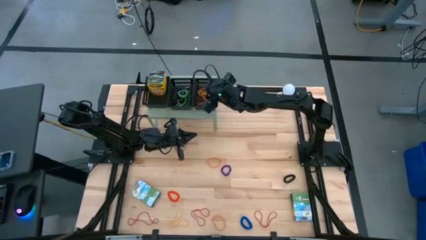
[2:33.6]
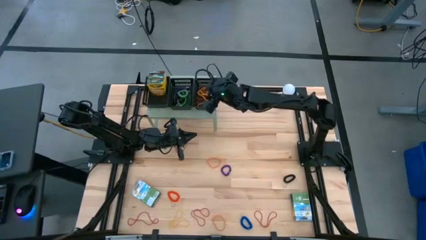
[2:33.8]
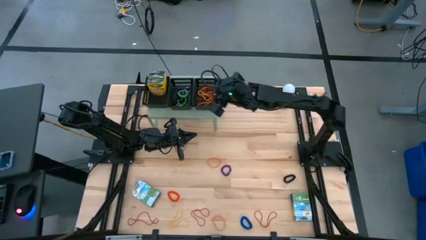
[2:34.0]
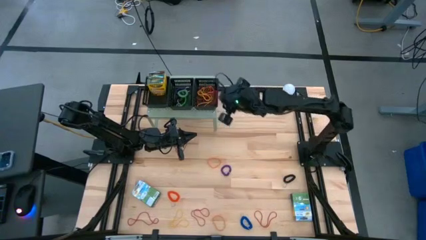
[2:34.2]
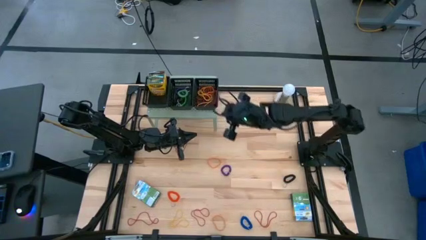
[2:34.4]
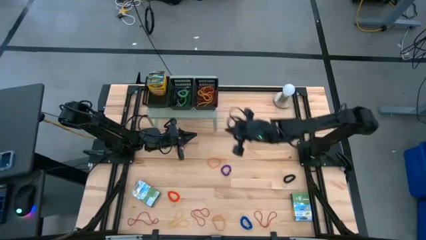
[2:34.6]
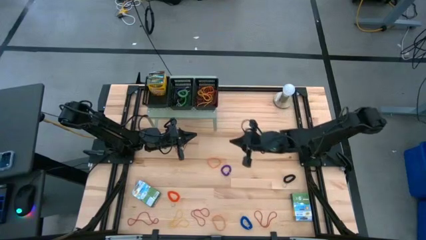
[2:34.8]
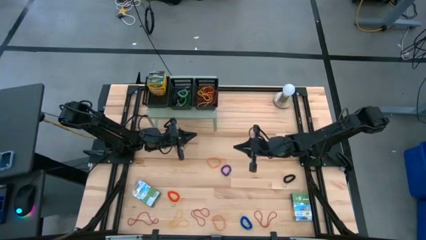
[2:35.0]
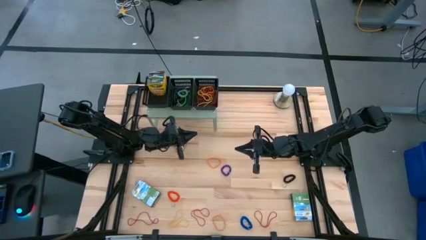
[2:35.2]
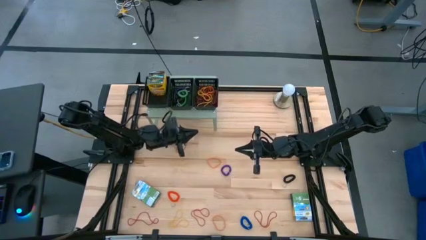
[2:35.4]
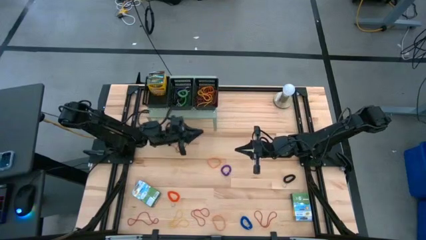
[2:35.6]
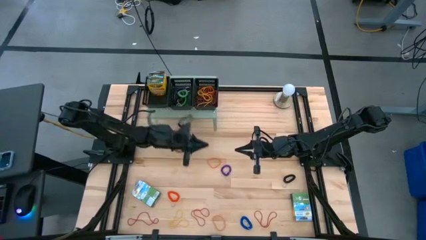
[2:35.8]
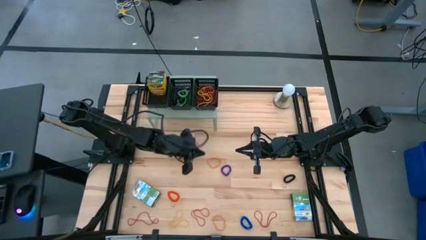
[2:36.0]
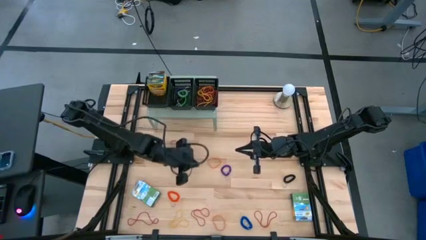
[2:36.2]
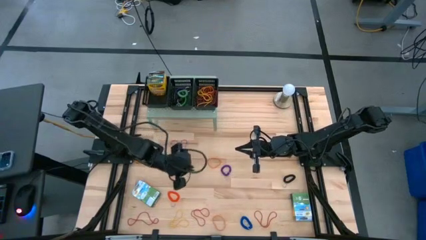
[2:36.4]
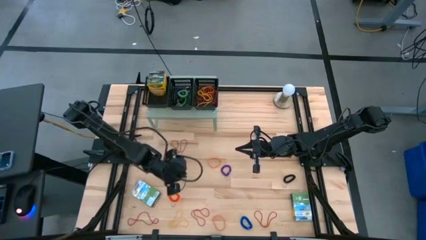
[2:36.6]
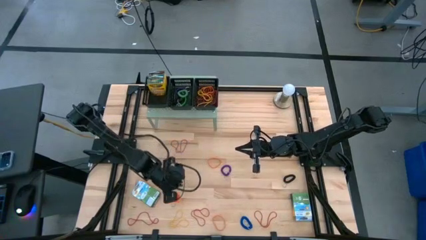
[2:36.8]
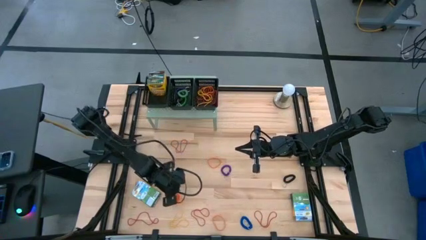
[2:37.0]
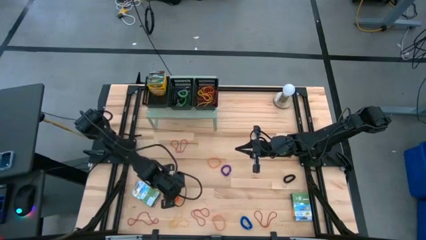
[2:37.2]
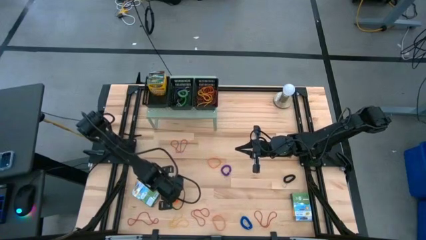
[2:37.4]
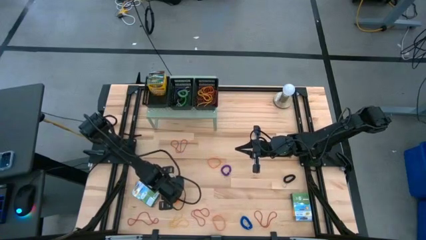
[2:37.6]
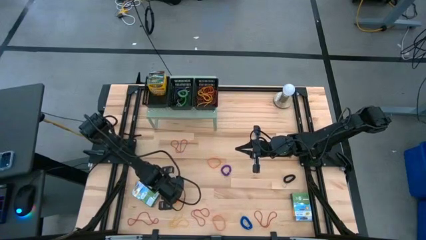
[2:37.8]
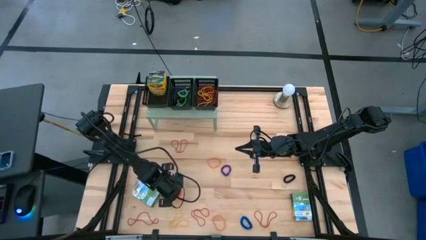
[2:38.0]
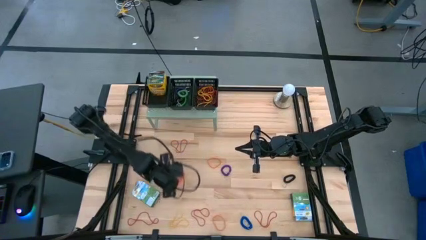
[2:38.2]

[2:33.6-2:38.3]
Task: Pick & Place Office Desk Supplies
Put the orange spring keychain into the middle black bin on the shelf

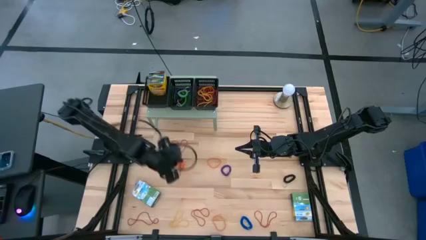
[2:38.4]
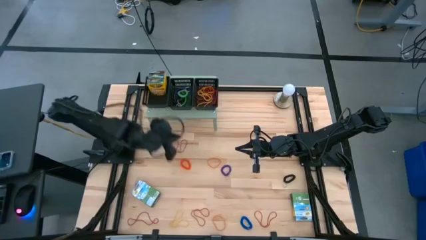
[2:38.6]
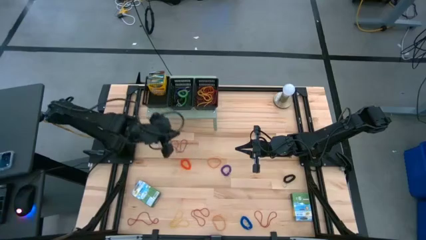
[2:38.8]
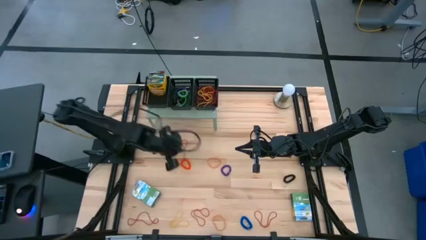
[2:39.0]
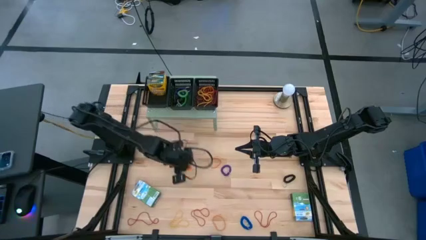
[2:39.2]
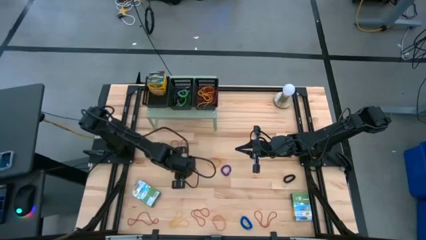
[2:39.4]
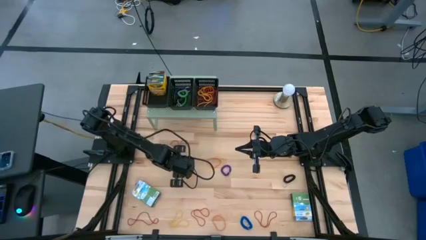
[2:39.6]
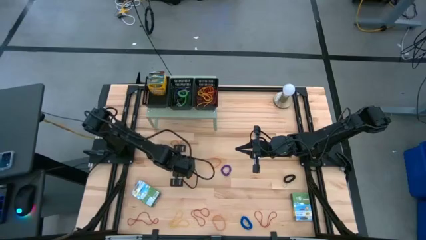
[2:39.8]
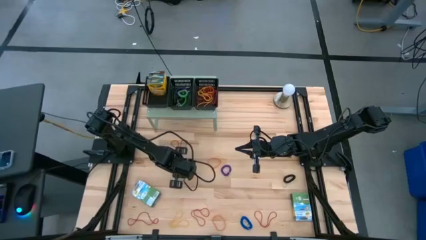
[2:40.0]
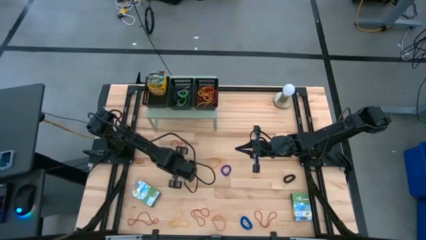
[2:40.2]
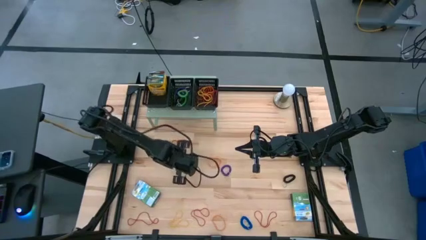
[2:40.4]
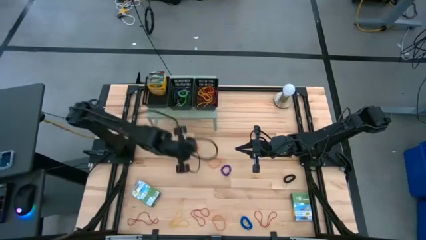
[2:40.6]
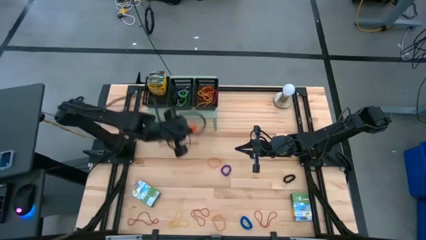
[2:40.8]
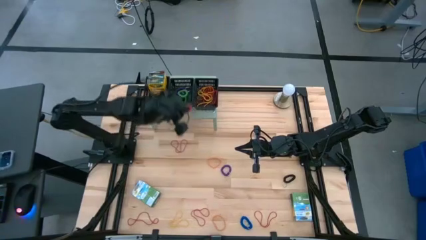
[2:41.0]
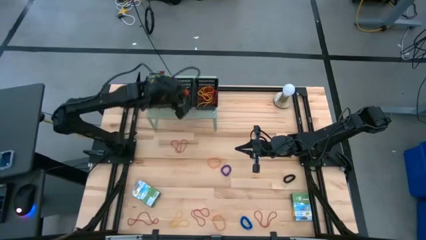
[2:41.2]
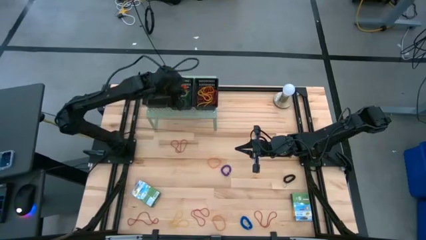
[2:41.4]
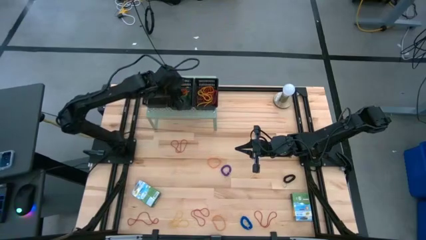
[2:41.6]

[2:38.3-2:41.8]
Put the orange spring keychain into the middle black bin on the shelf

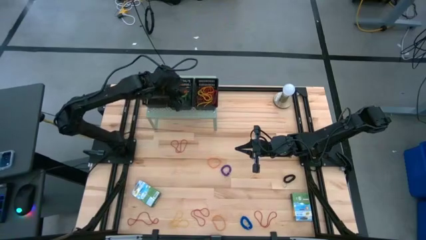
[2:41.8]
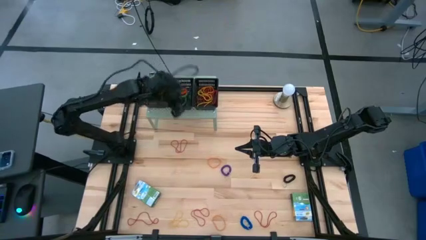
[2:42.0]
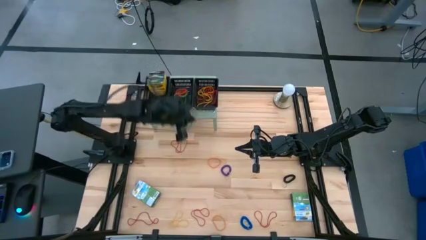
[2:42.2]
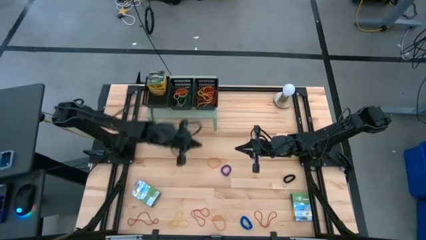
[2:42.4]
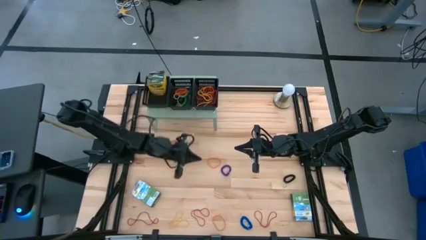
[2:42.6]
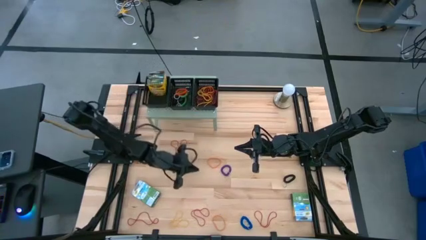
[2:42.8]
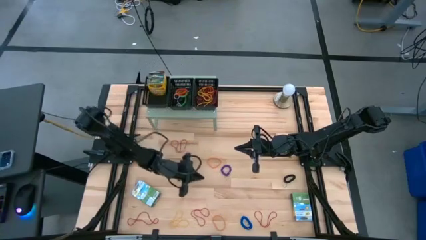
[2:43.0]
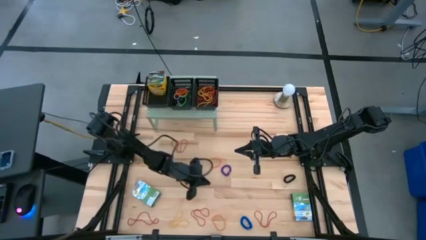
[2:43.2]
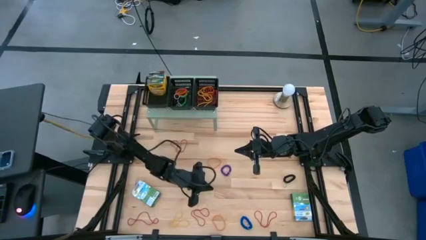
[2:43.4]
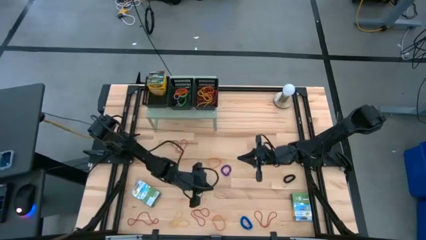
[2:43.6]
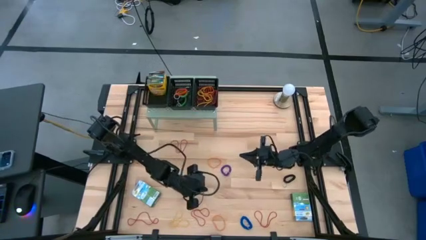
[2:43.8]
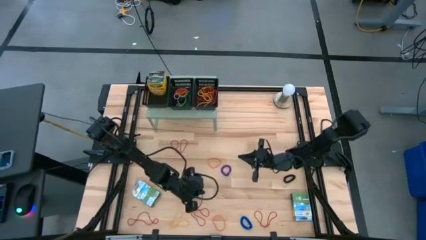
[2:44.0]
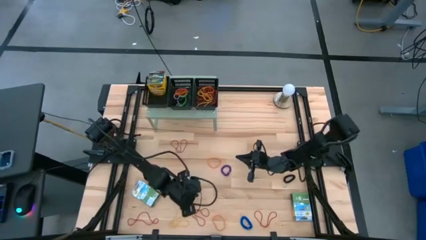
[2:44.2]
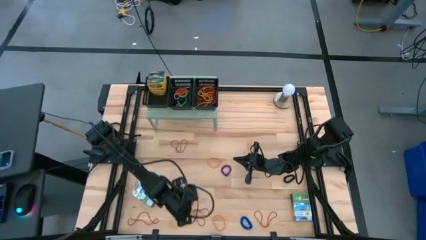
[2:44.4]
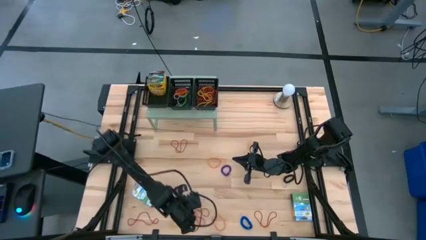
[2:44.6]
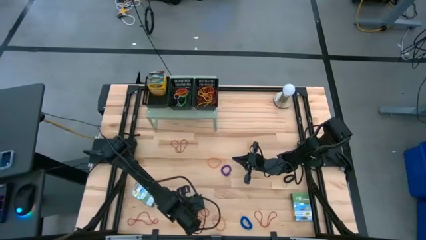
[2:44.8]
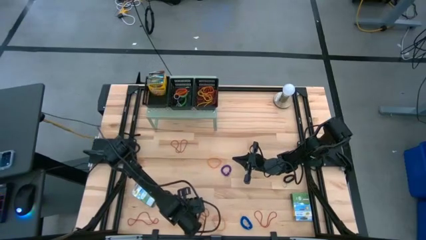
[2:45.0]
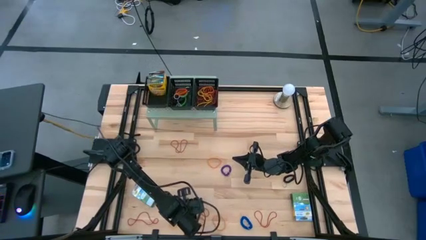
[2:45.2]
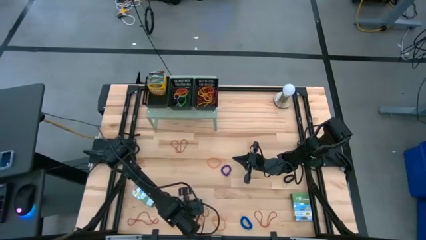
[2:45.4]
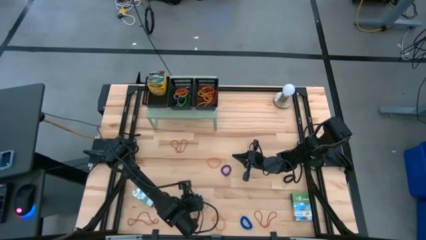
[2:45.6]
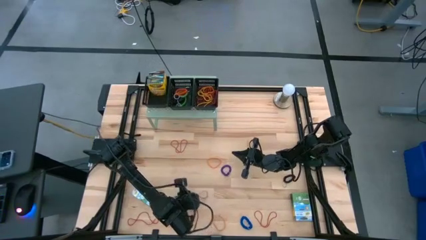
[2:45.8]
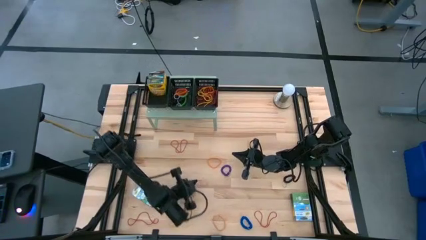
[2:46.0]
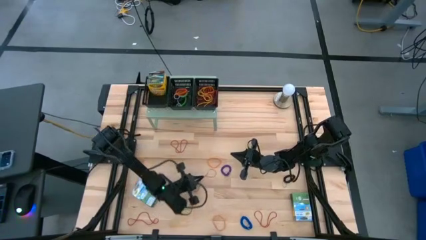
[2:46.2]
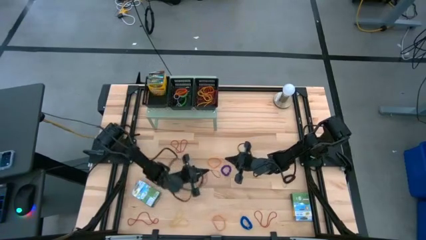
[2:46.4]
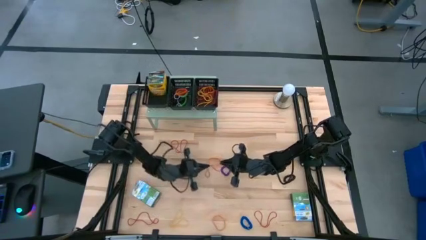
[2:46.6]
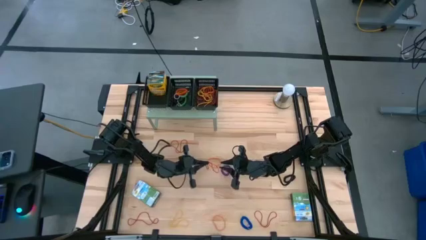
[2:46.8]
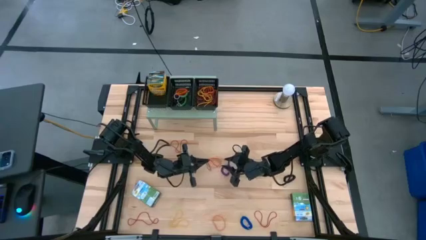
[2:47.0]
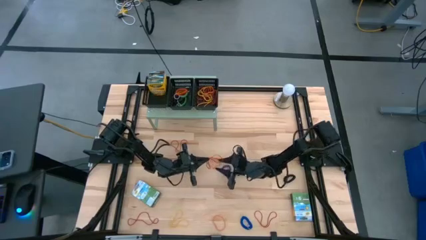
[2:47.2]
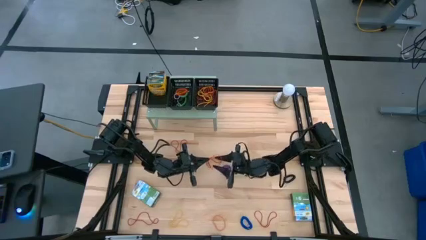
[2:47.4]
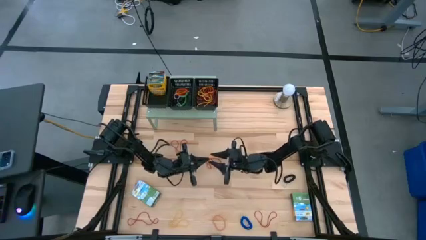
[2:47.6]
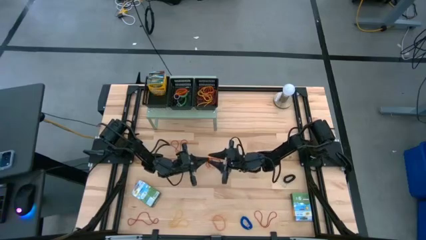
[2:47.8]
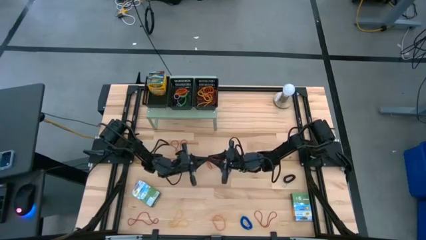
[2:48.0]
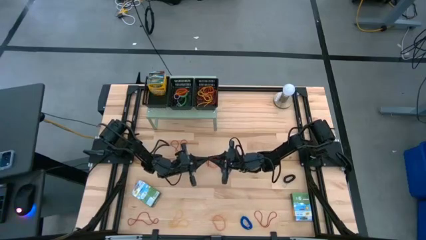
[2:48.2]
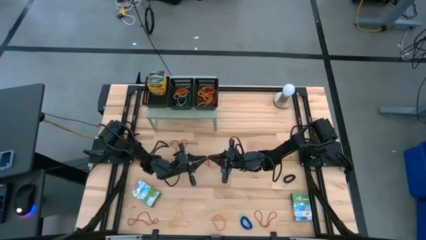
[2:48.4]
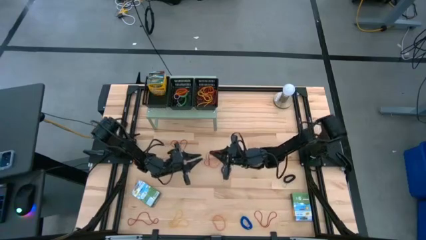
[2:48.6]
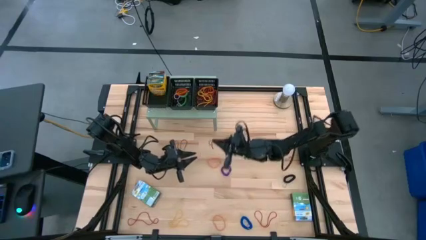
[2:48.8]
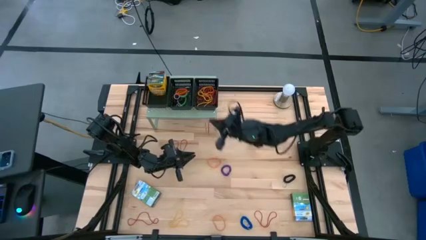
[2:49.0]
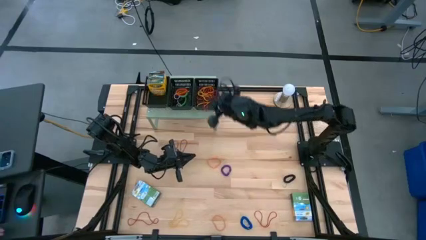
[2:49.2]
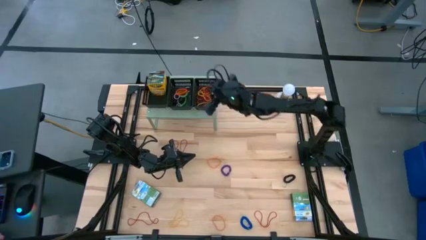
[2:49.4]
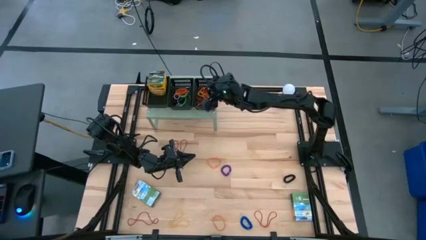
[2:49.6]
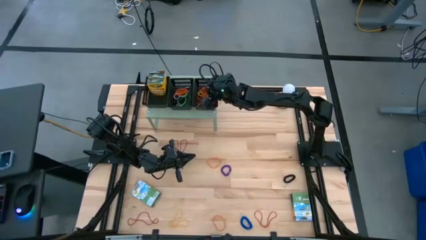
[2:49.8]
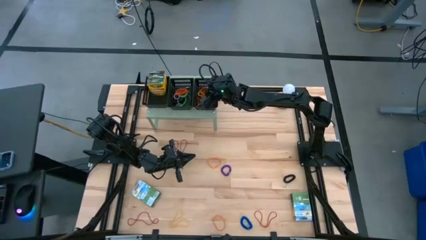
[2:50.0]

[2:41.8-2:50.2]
Put the red rubber band into the right black bin on the shelf

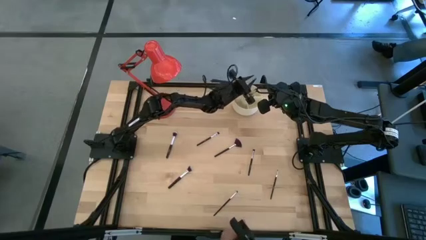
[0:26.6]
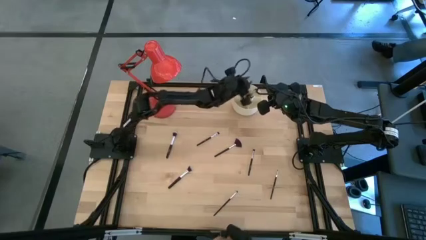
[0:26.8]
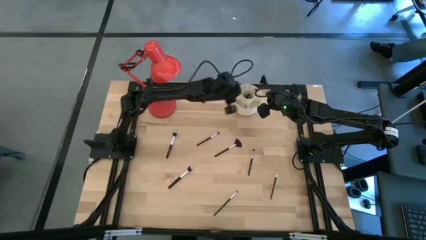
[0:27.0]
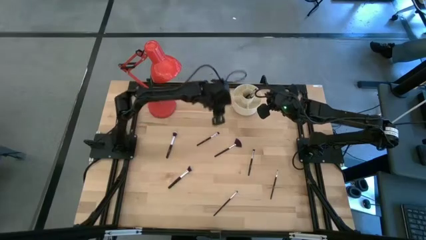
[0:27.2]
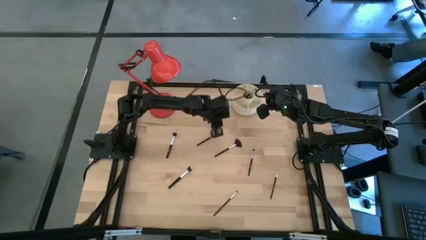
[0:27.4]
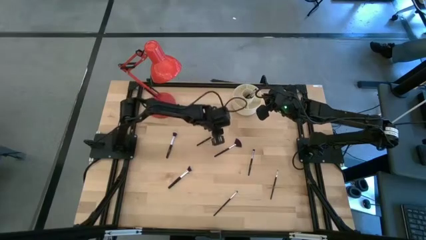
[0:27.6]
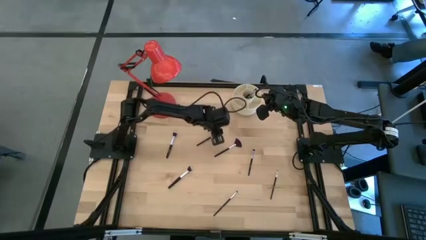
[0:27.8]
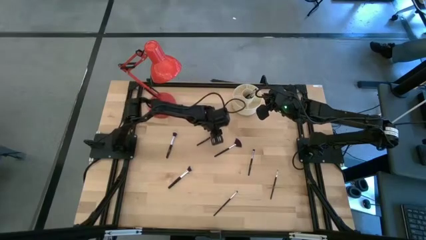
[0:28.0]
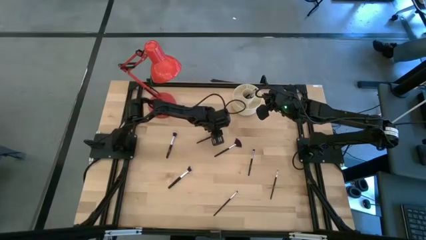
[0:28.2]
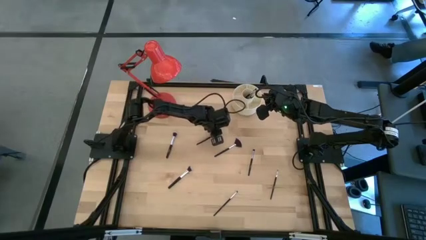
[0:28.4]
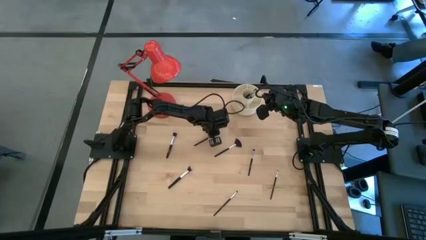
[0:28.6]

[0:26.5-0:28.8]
Task: Put items in baskets/containers
Put the black eyeshadow brush into the white organizer
